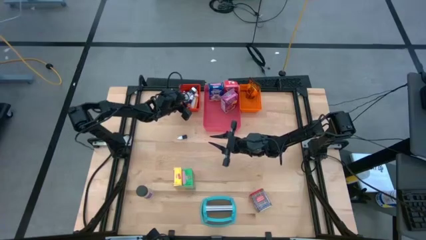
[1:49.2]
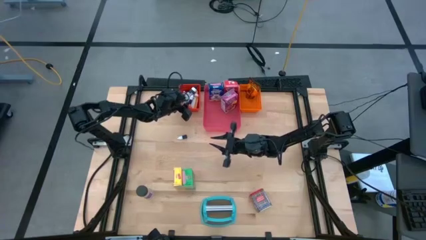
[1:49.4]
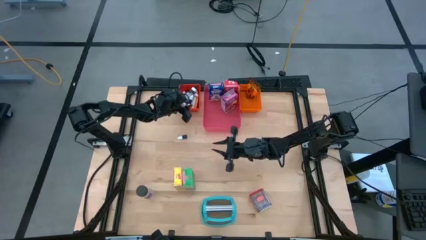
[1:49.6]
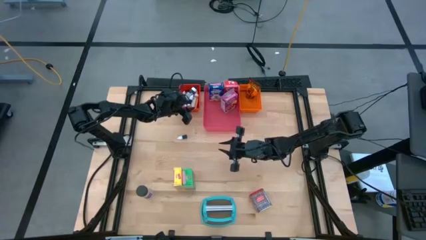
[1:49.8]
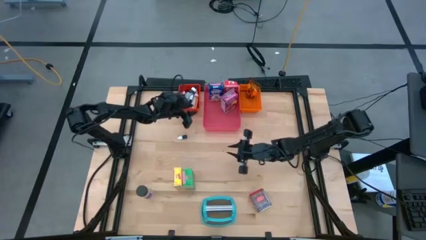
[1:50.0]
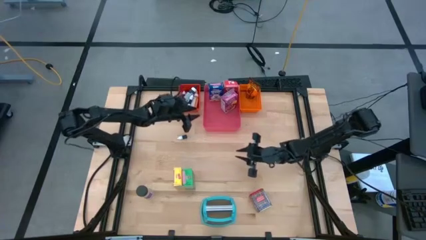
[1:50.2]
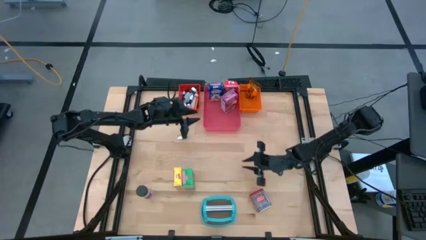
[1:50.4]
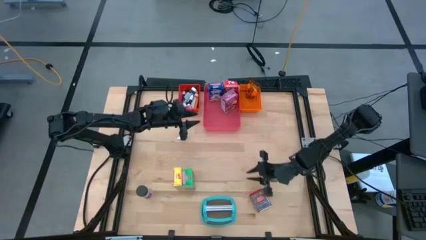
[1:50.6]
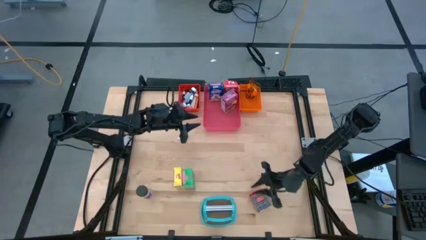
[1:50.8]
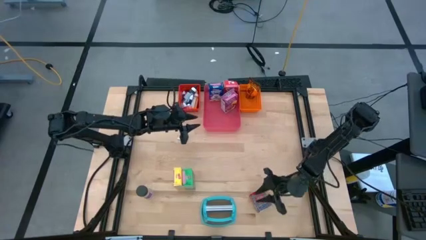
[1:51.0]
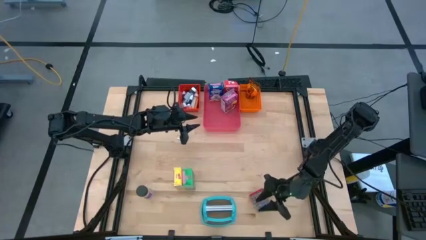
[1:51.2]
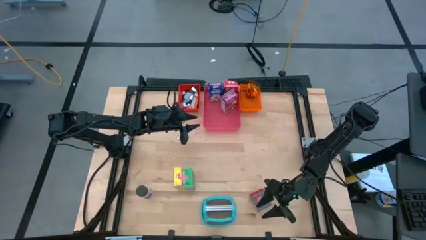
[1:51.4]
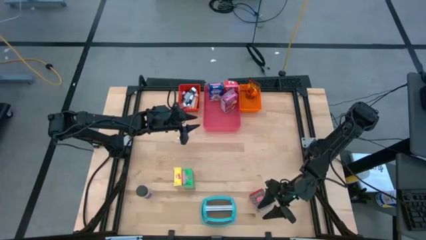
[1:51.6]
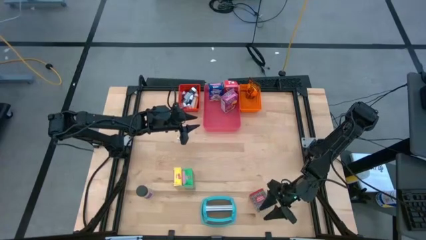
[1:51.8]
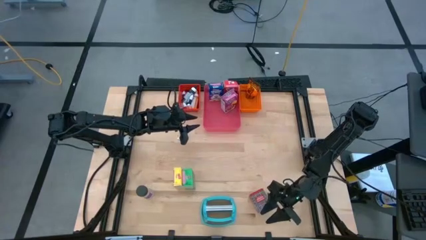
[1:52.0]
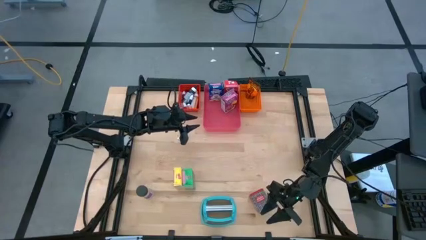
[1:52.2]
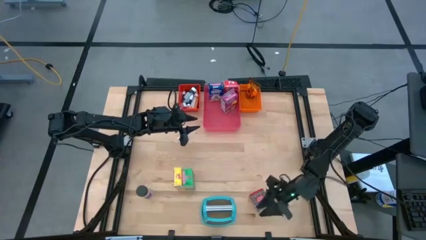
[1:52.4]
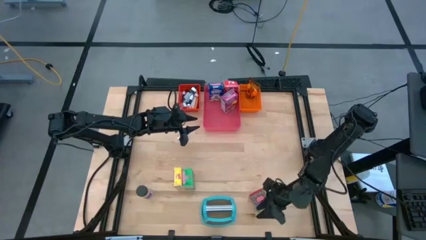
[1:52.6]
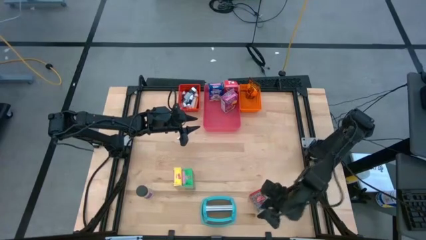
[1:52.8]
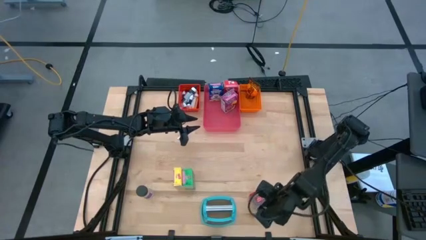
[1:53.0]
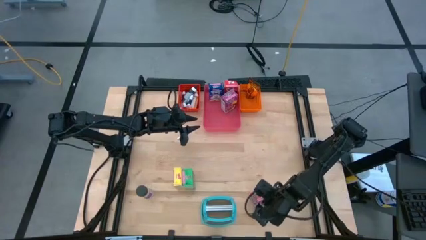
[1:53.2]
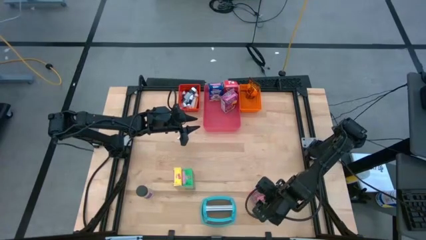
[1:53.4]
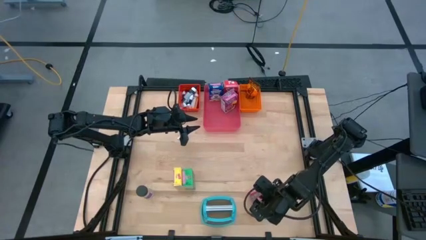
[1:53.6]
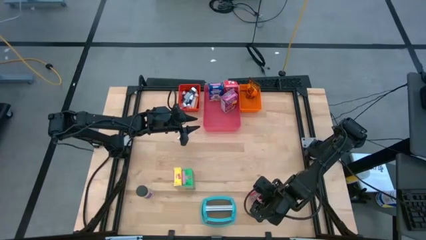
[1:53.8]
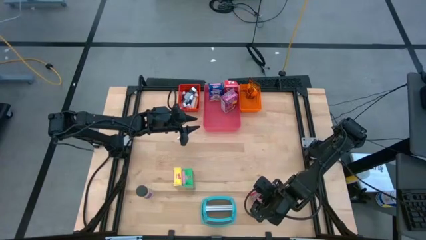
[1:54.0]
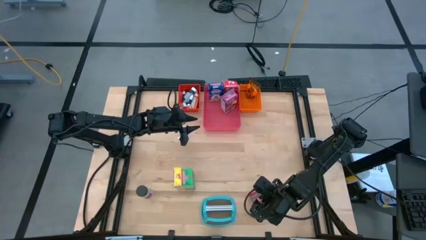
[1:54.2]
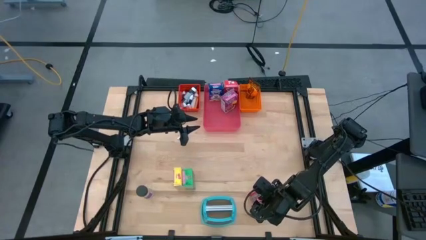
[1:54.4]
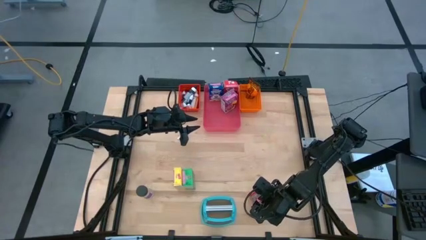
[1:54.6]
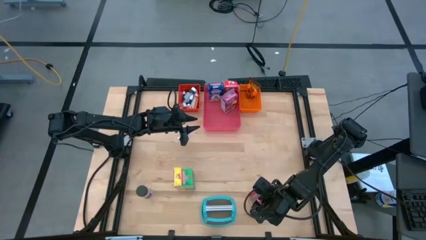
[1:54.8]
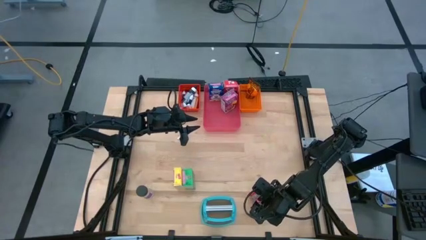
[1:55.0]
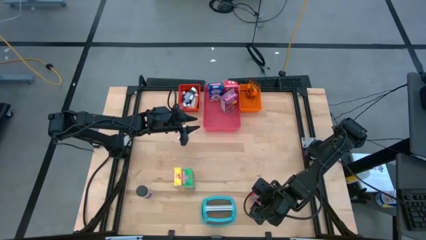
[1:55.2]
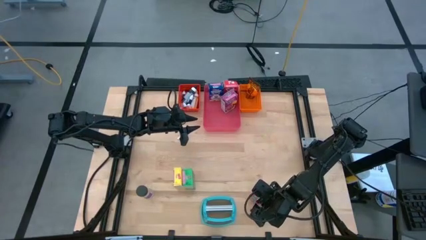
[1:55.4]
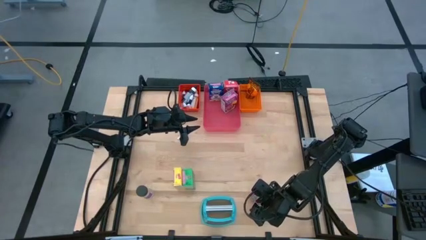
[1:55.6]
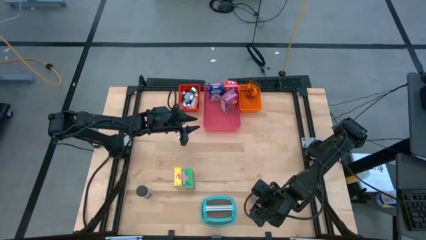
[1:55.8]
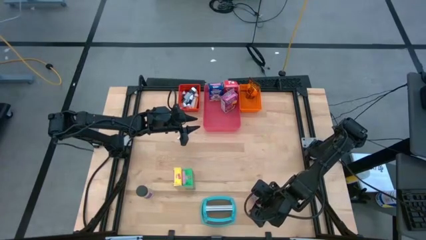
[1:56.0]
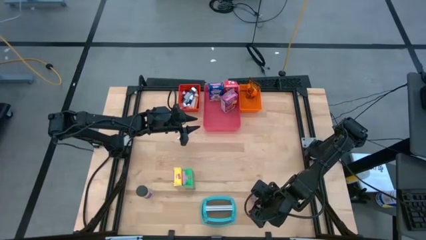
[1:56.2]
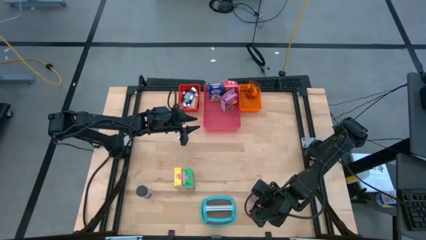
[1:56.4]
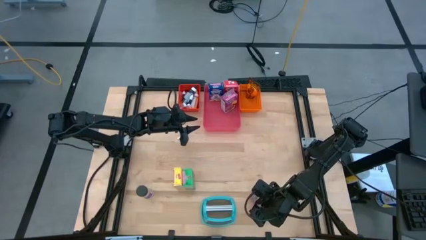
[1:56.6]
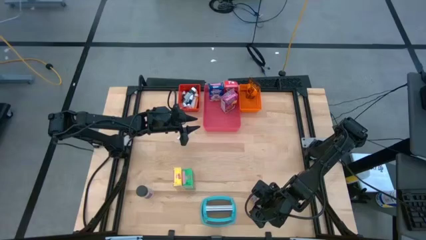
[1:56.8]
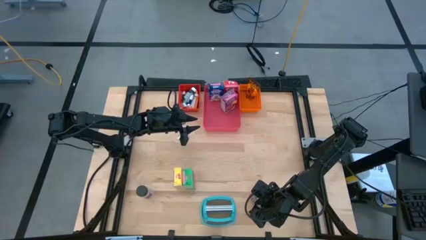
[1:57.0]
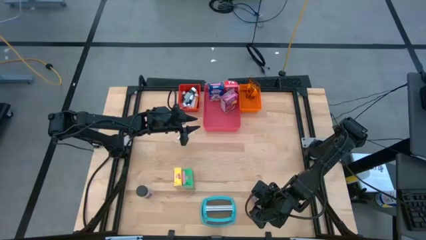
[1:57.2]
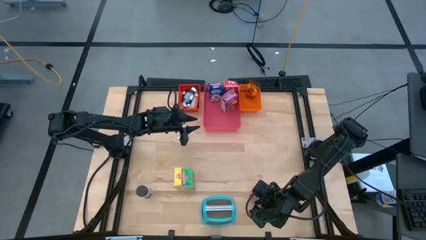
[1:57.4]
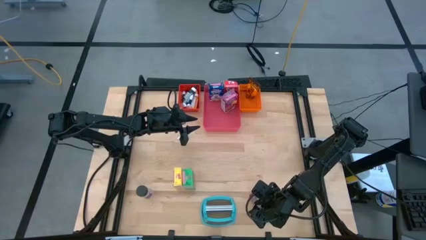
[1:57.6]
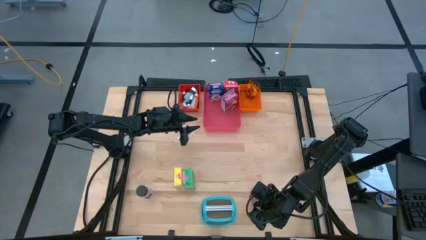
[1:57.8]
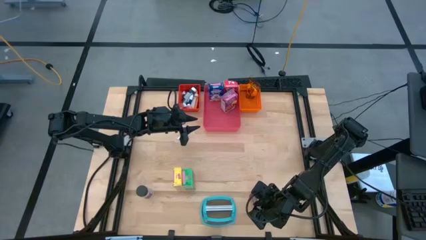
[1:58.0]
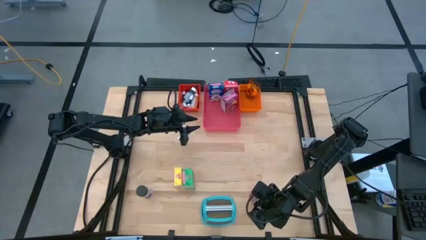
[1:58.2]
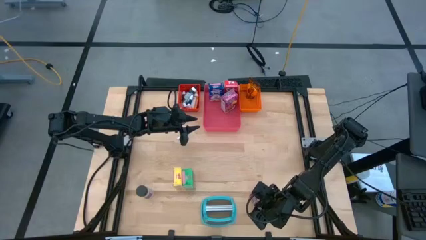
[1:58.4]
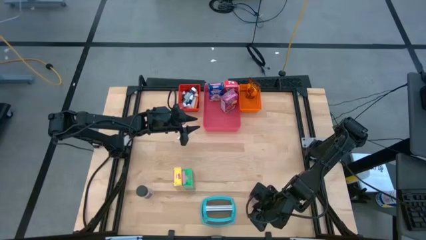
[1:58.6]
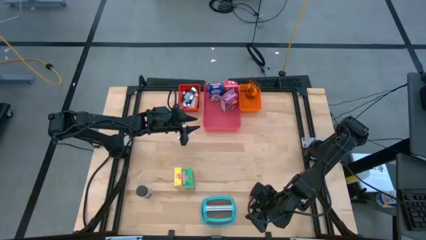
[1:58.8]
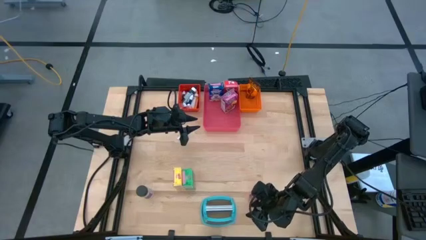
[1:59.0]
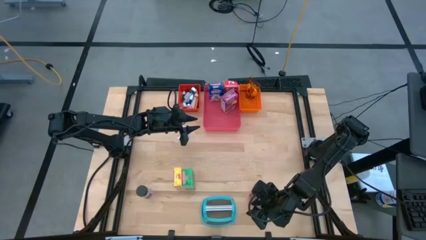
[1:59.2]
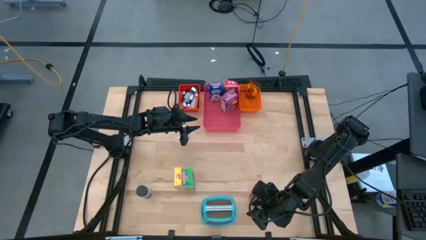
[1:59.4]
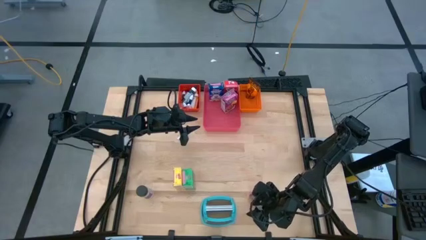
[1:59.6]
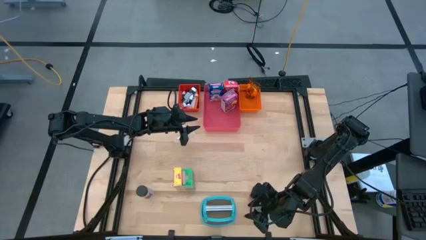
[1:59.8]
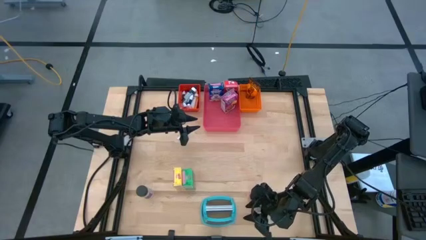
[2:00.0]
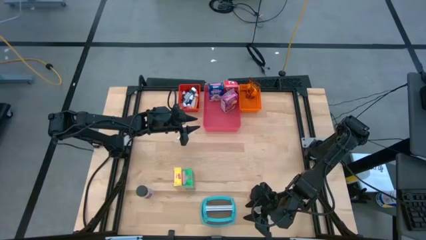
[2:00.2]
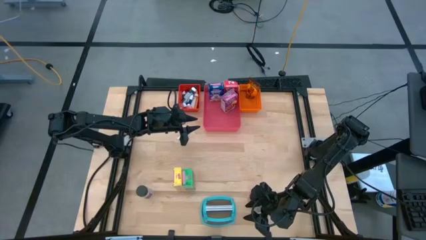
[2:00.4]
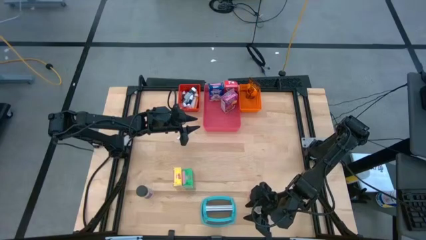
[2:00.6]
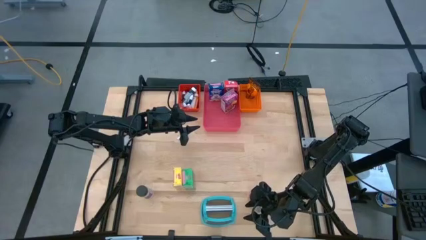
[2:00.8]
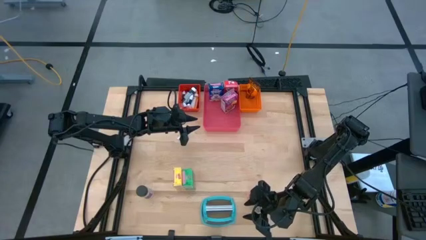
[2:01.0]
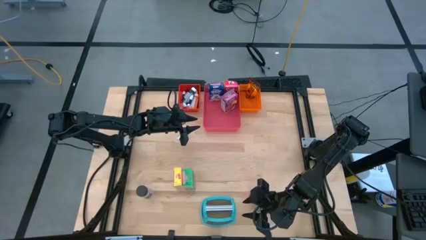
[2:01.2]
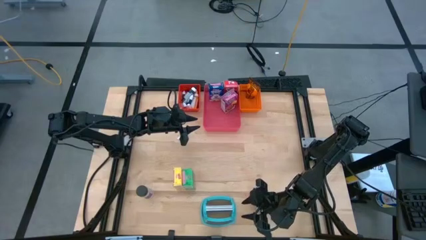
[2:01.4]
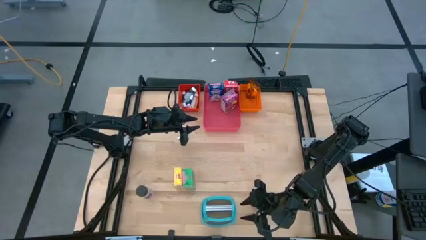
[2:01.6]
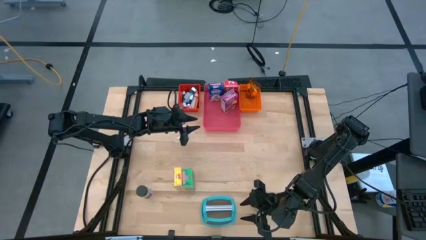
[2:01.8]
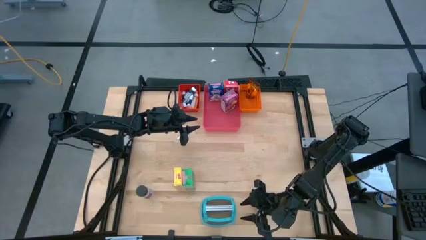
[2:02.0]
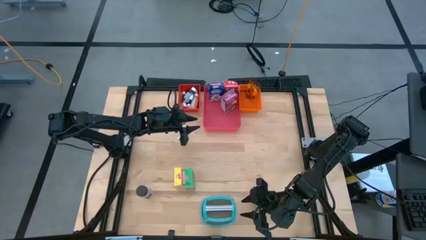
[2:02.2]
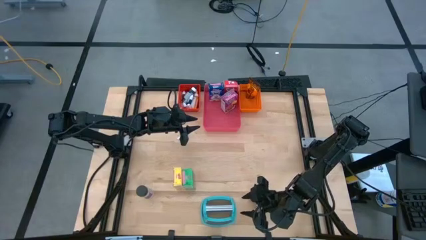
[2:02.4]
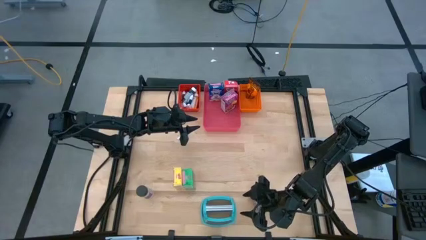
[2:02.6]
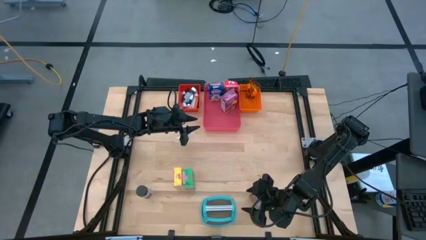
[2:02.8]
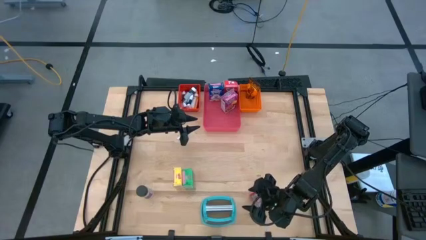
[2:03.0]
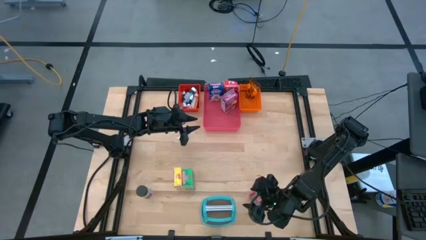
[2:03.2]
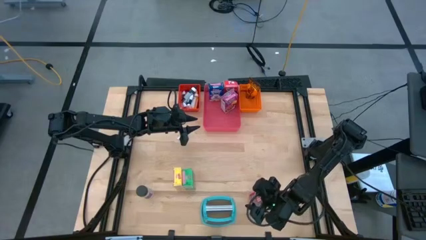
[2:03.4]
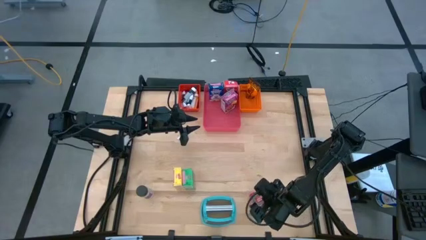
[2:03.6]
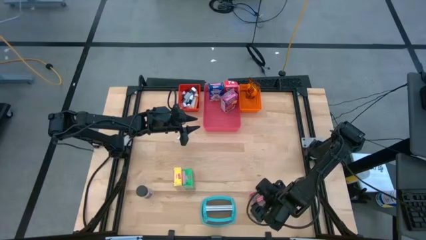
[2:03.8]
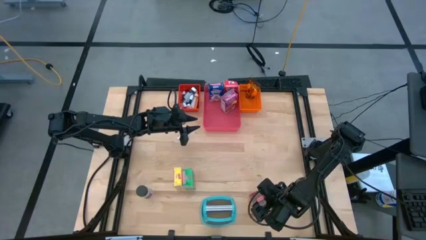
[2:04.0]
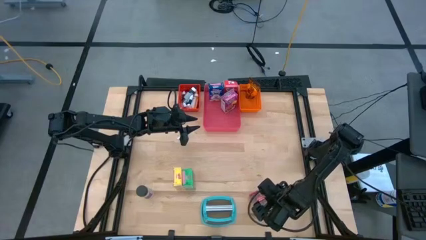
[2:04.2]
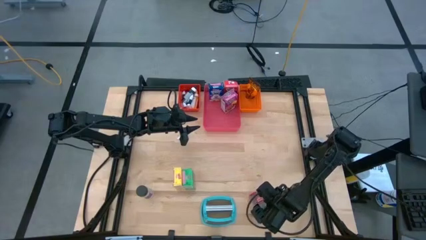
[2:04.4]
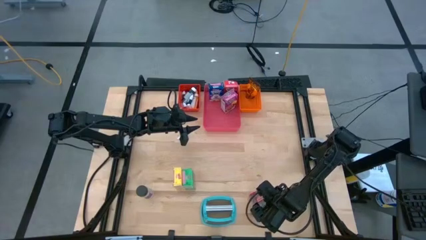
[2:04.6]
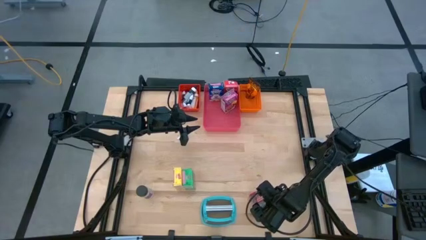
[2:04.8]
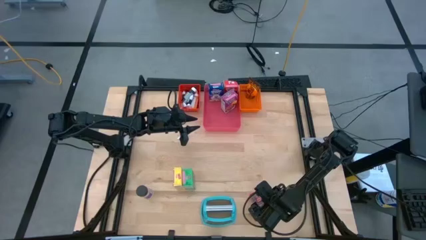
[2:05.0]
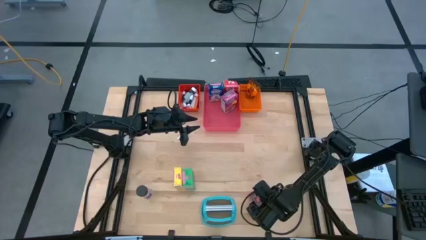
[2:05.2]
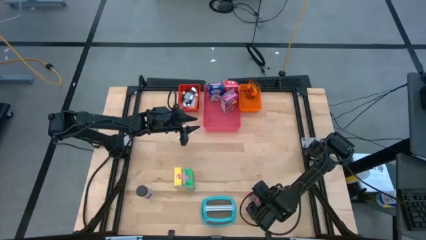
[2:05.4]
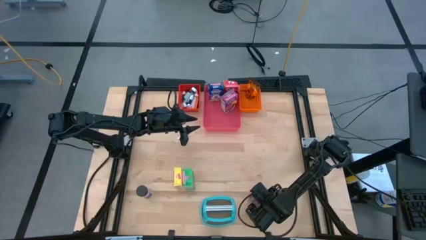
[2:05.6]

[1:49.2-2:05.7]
Task: Pick & Place Kitchen Items
Put the red seasoning can into the orange bin
